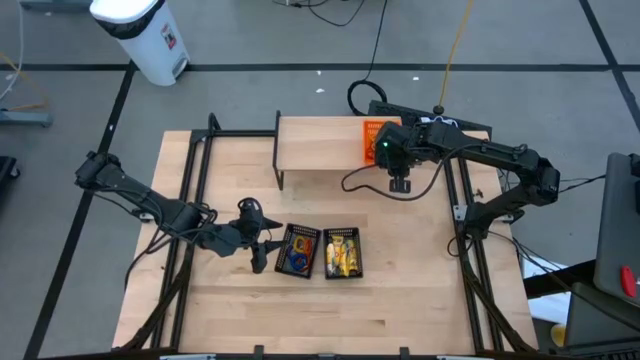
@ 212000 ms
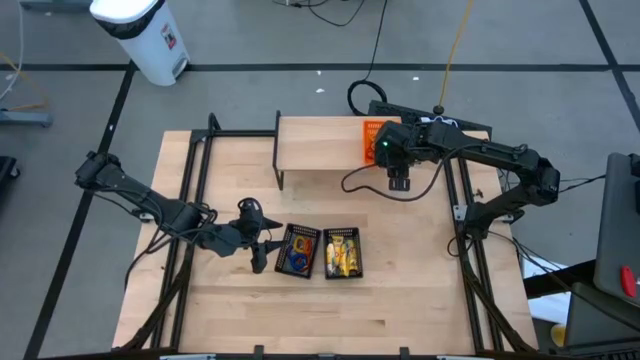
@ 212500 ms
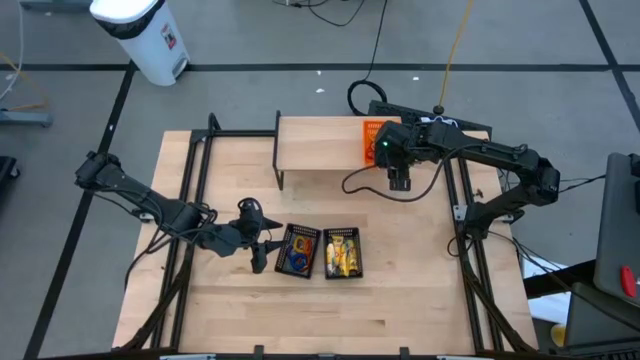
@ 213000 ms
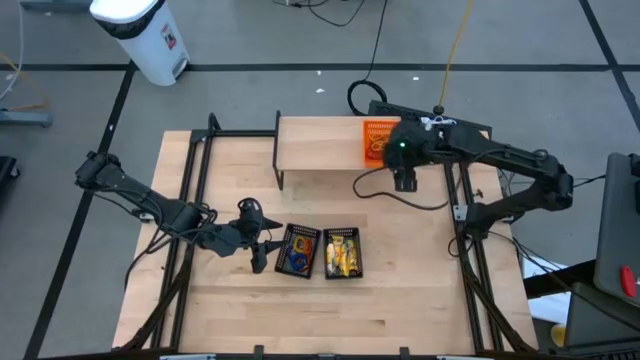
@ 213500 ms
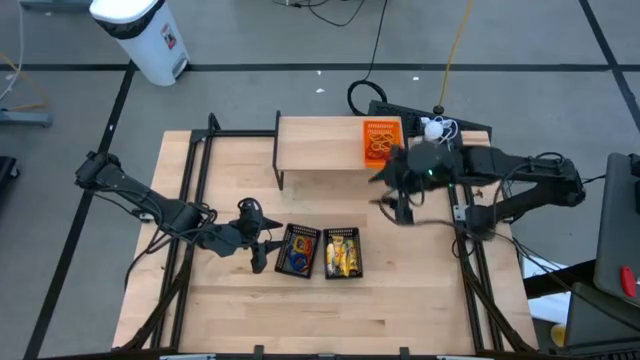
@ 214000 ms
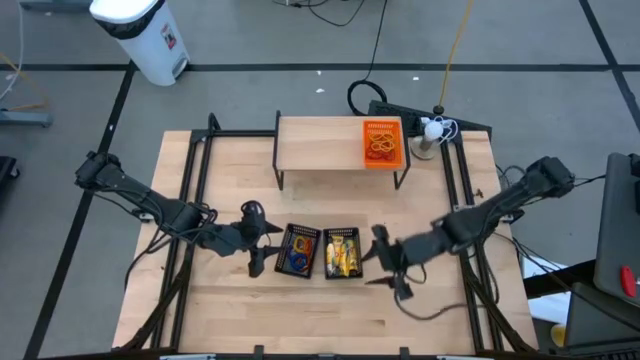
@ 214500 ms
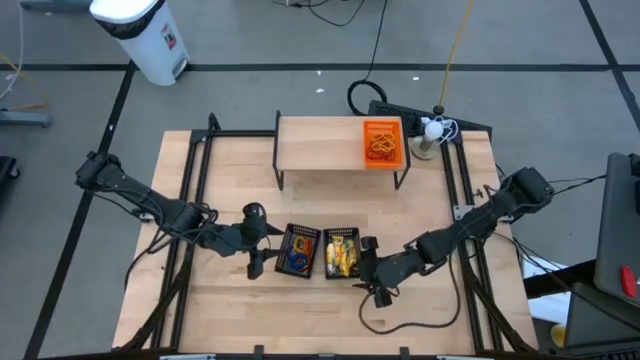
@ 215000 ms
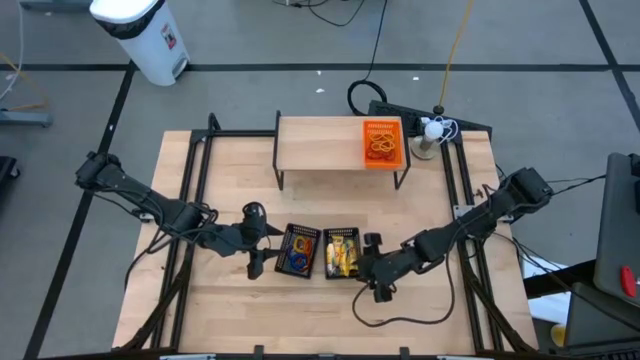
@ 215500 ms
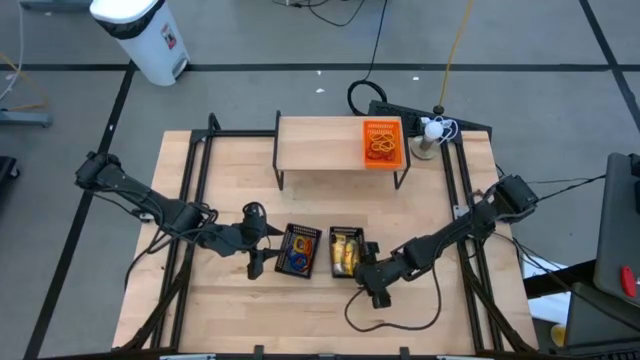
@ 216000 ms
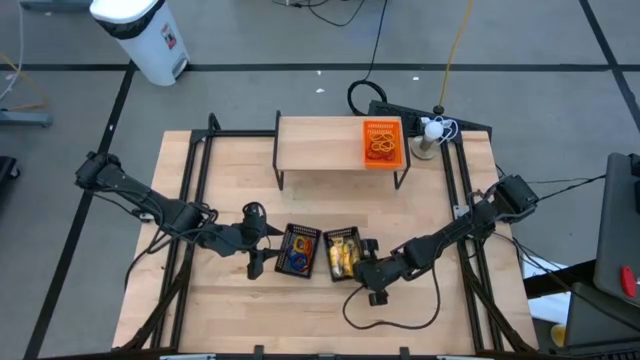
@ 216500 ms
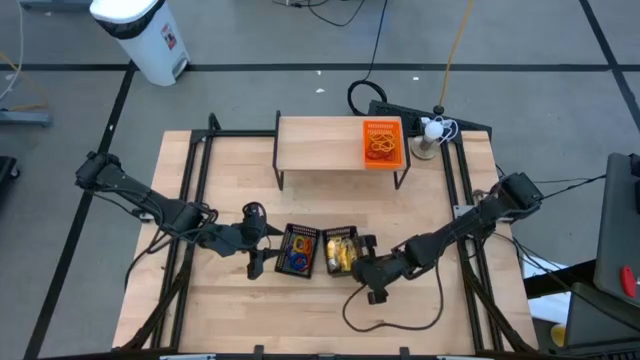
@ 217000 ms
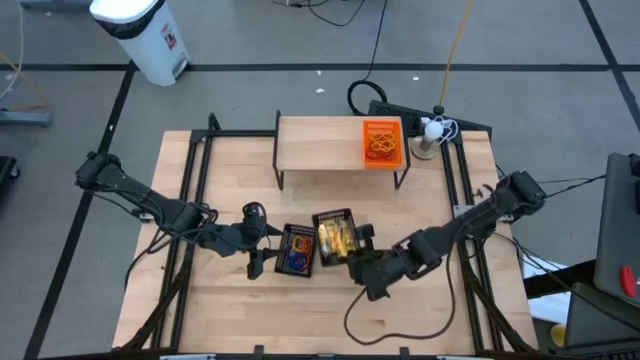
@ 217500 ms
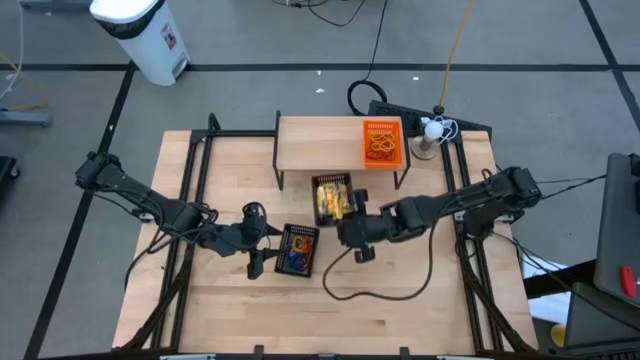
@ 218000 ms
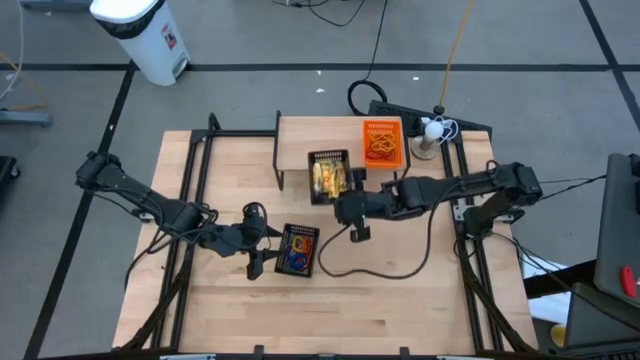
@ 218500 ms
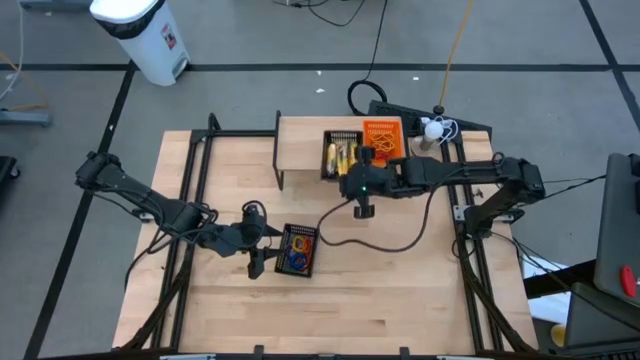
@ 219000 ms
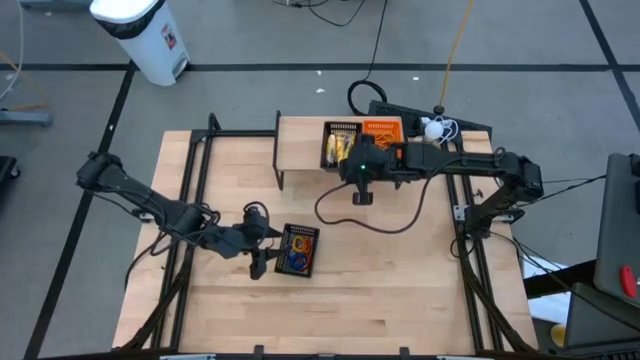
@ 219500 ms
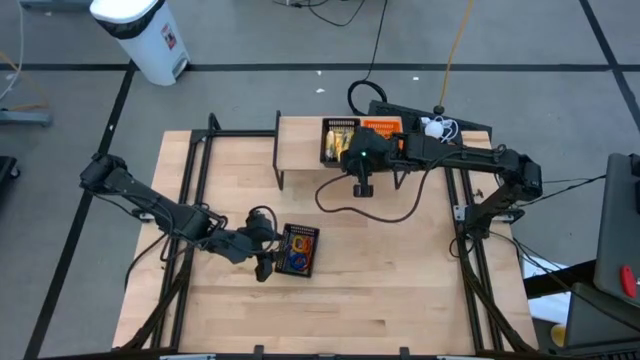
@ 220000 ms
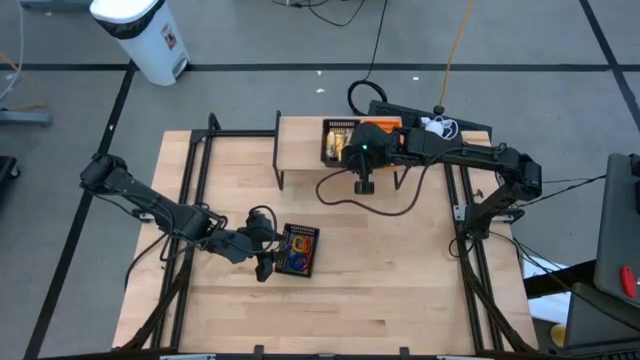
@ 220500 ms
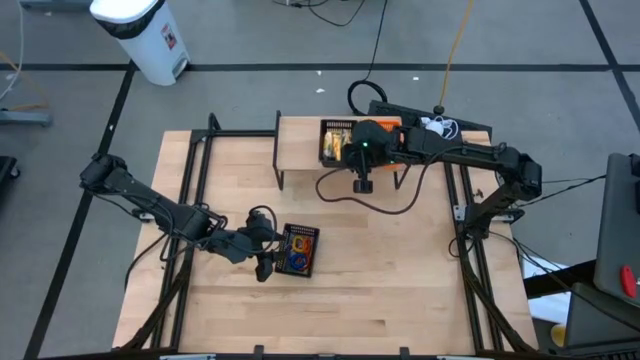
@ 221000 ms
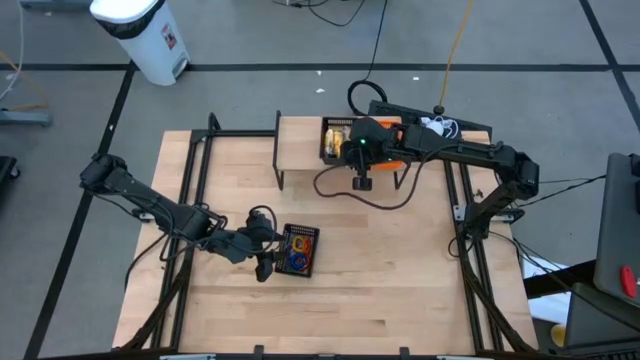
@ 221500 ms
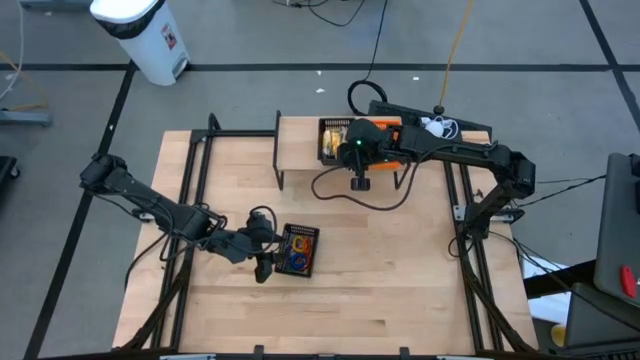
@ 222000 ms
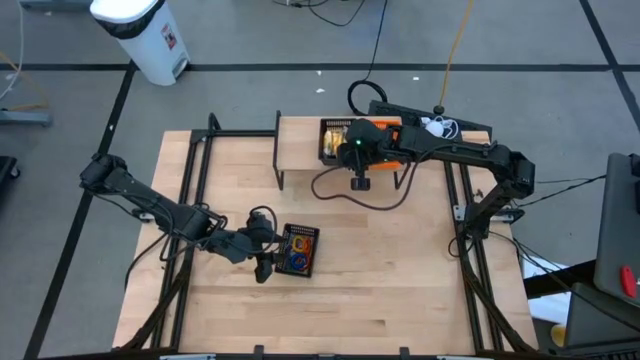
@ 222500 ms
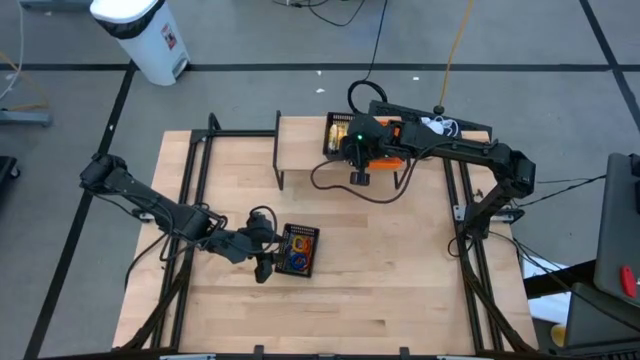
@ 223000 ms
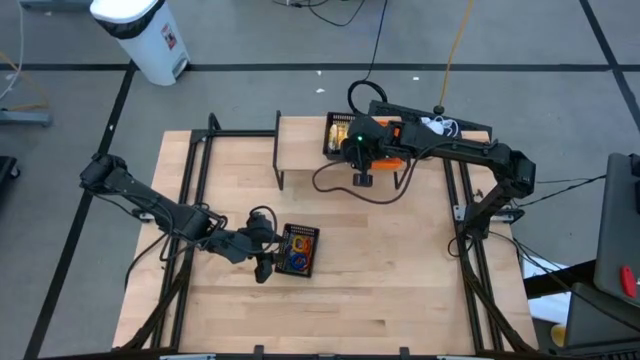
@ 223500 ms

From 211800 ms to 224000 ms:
Task: Pick & Place Office Desk Supplies
Put the right black basket filled with crayon box on the shelf

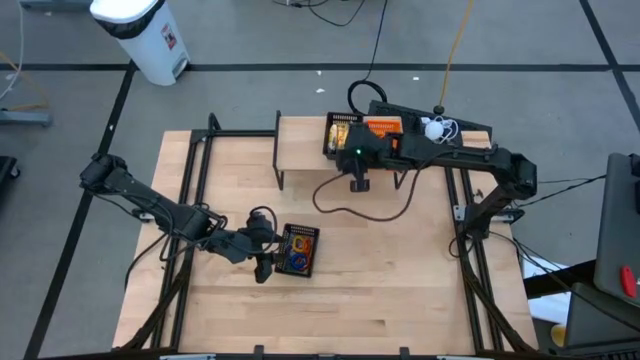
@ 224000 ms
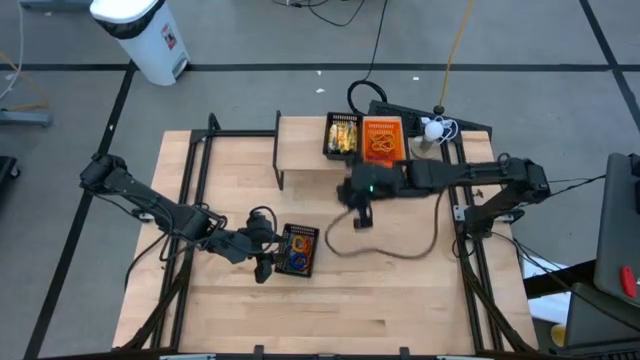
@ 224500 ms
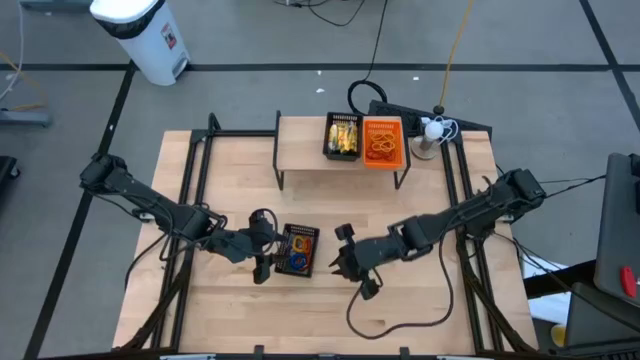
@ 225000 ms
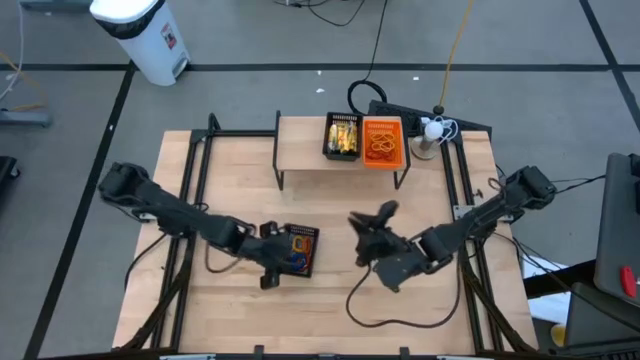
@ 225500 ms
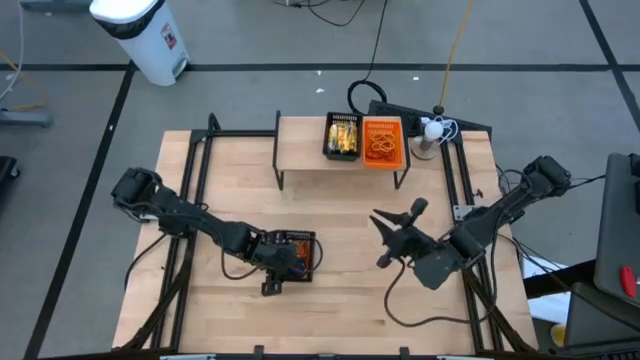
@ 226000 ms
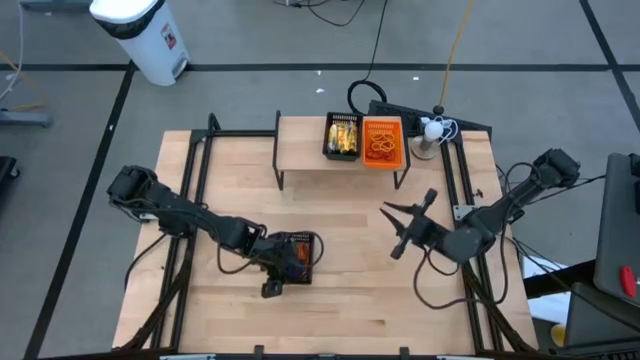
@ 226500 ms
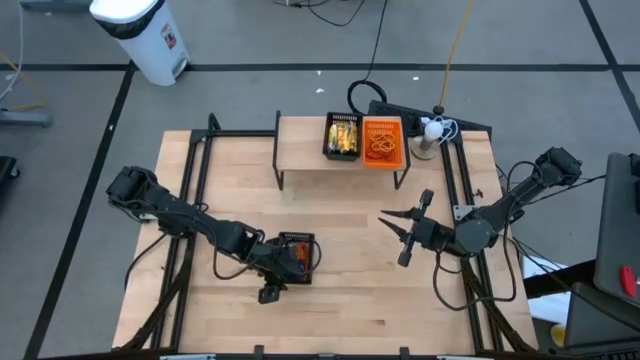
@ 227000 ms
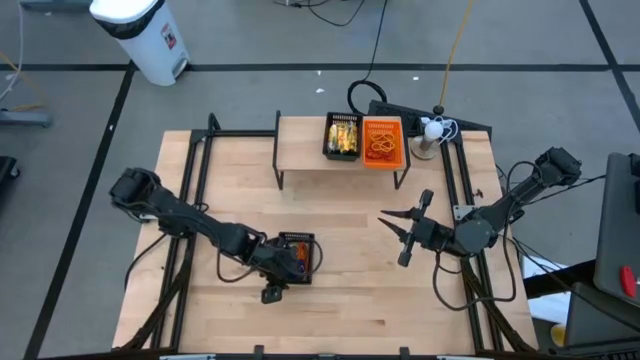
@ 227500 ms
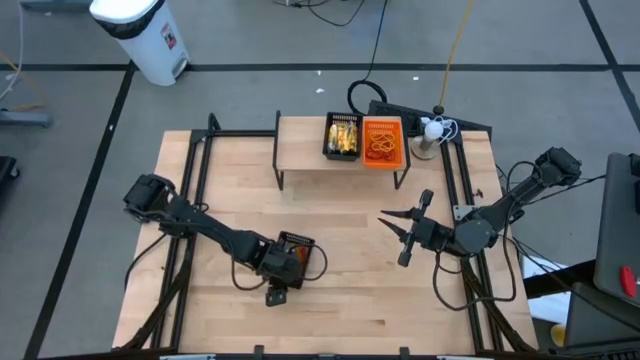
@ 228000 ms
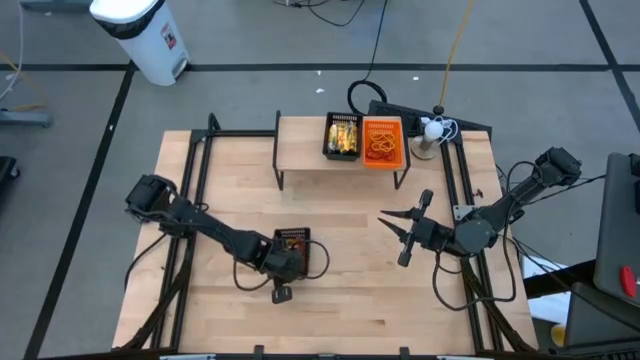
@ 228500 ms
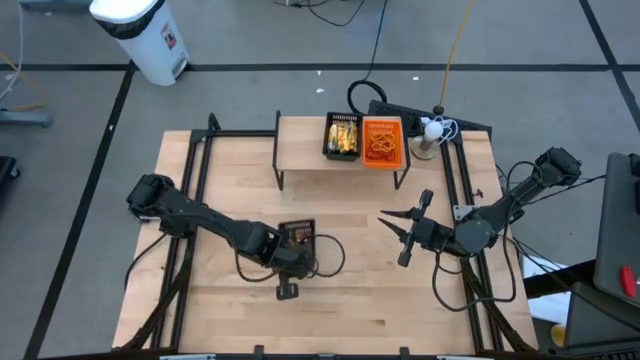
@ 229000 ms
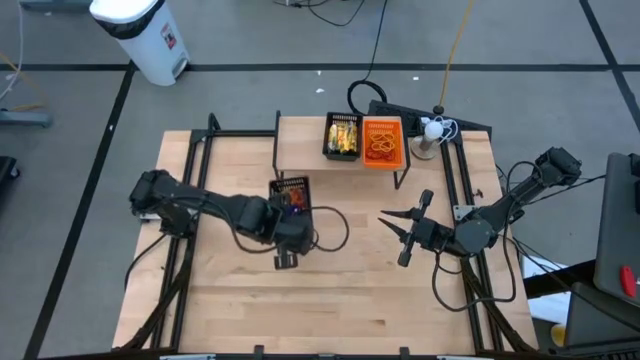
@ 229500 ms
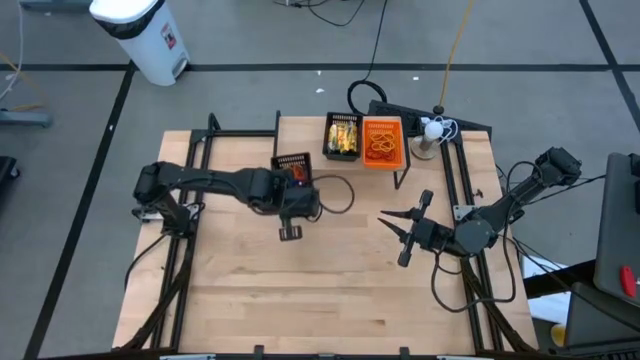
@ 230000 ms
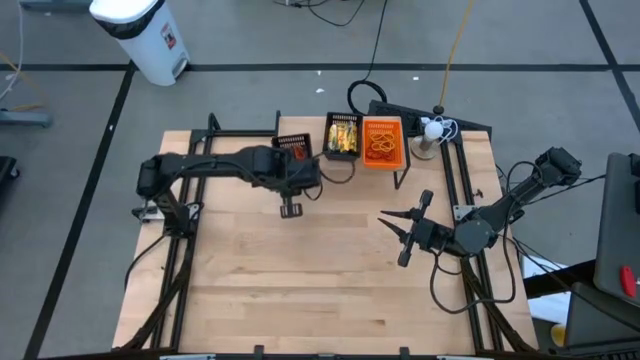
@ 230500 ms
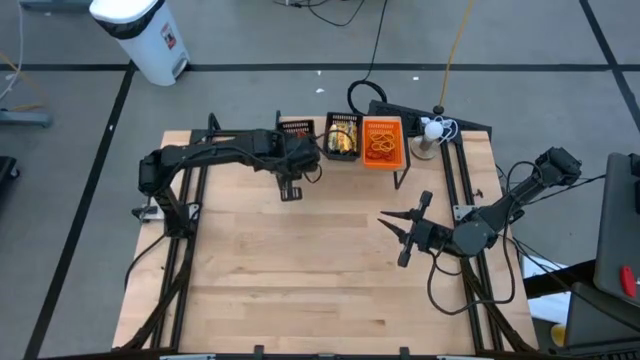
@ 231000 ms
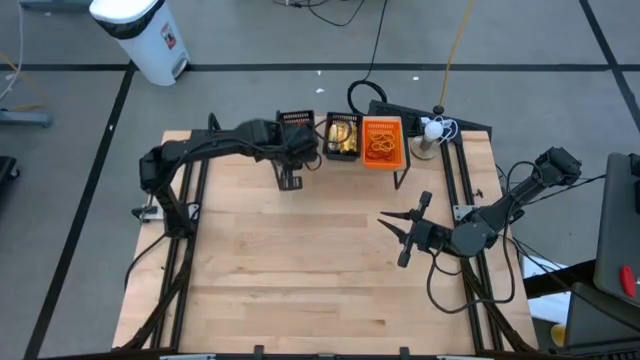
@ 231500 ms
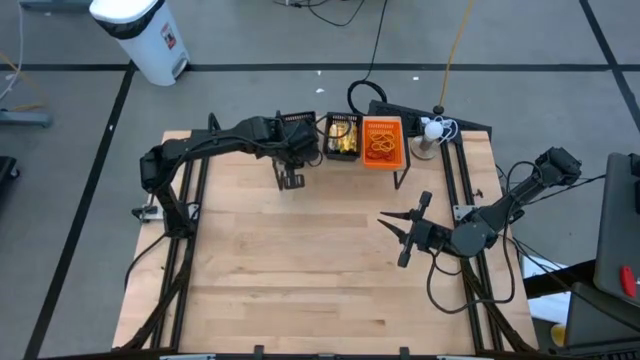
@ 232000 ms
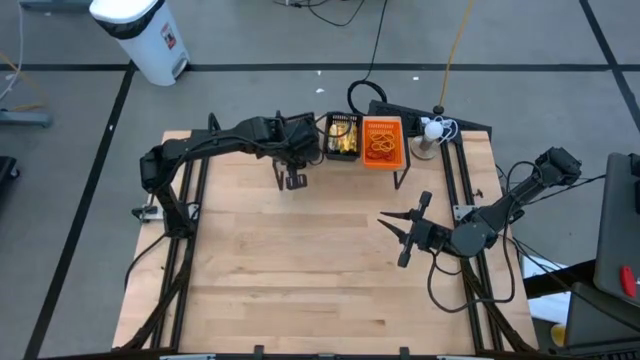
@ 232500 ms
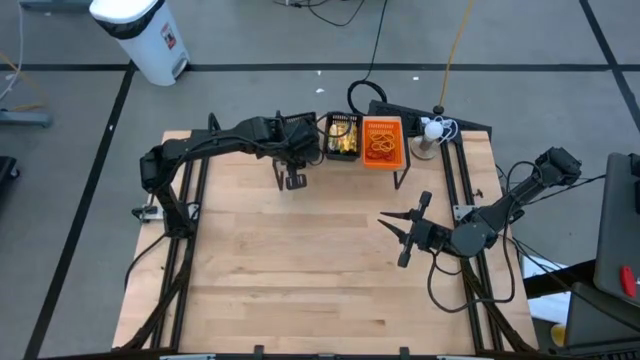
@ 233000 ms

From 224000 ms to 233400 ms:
Put the black basket filled with spring rubber band on the shelf
